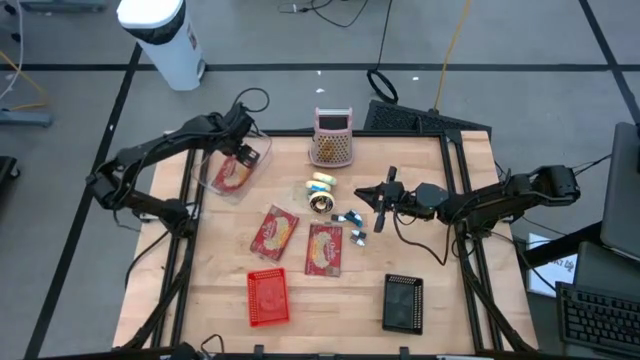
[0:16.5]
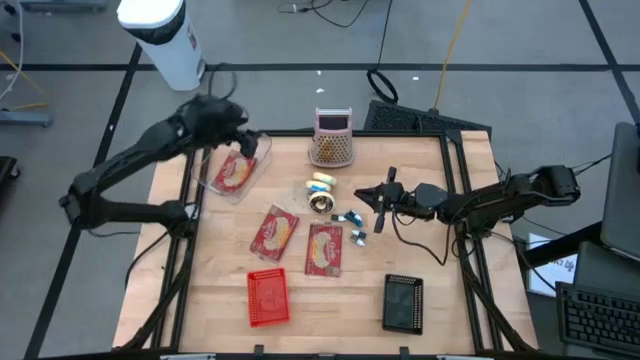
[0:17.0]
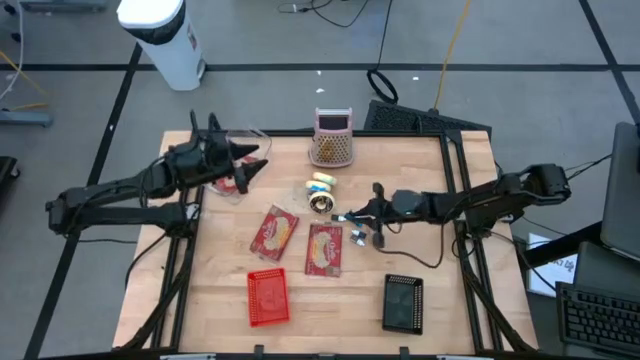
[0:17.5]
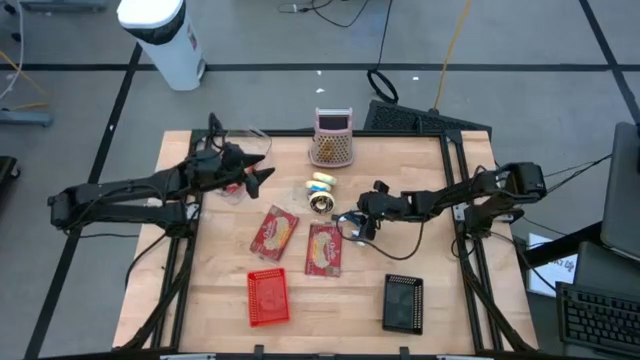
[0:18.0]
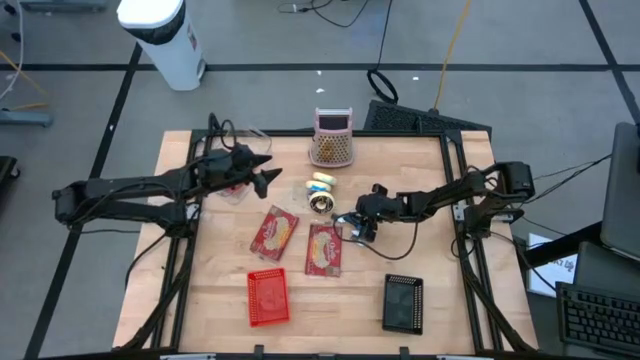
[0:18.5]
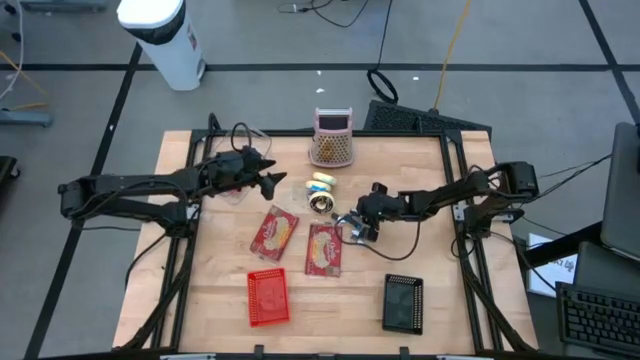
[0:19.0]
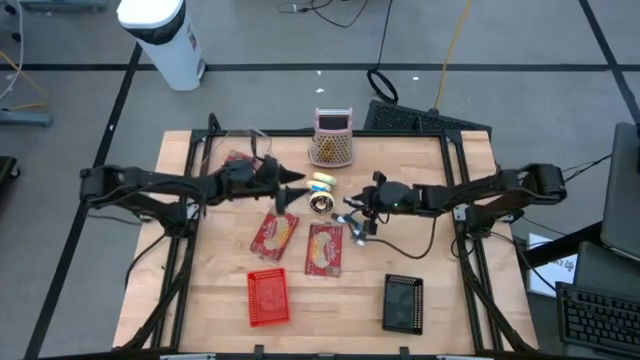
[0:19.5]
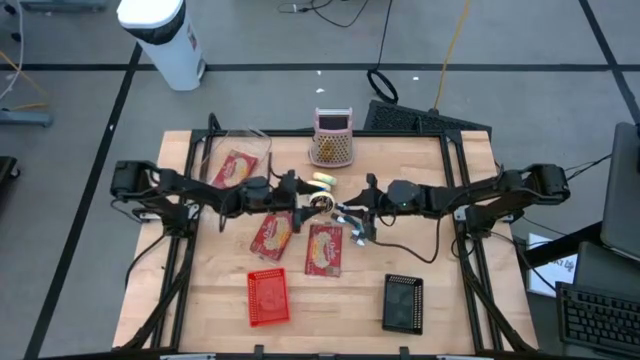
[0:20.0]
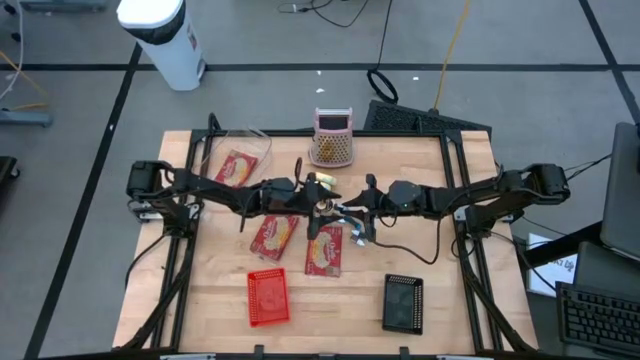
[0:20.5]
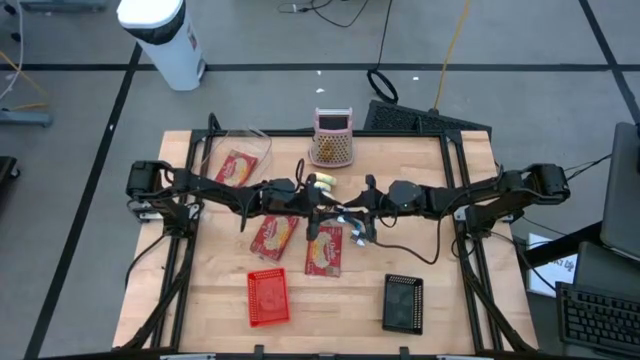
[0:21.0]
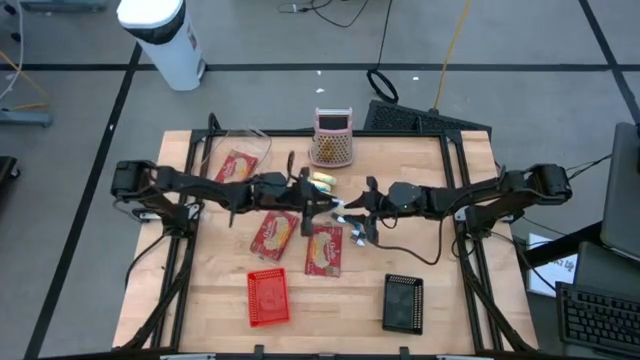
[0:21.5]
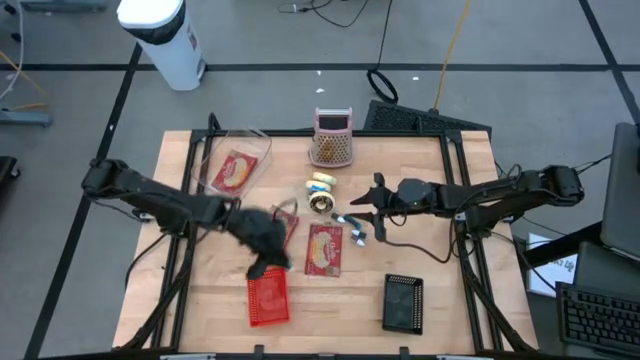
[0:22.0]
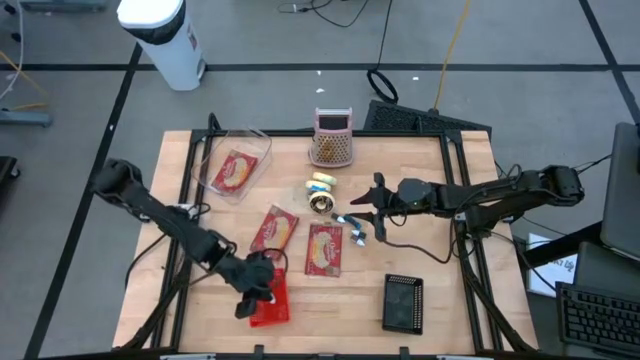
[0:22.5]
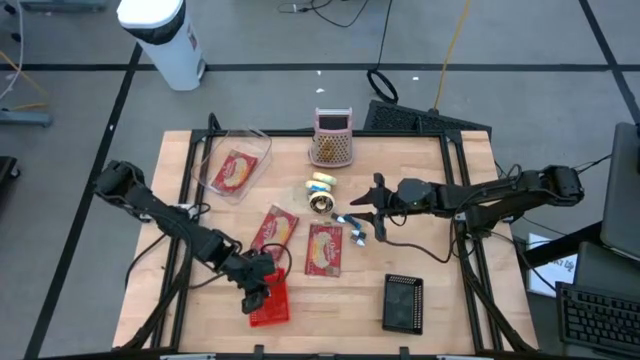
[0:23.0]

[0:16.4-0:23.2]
Put the violet food coloring bottle into the red bin

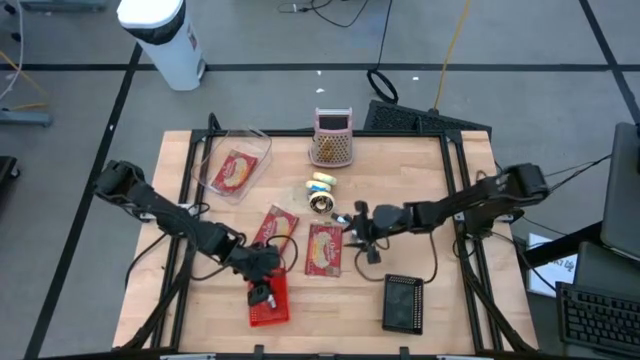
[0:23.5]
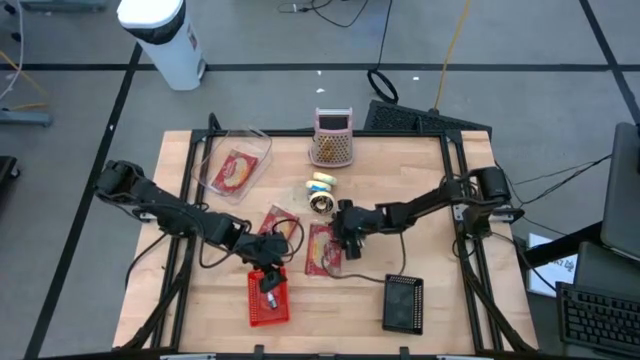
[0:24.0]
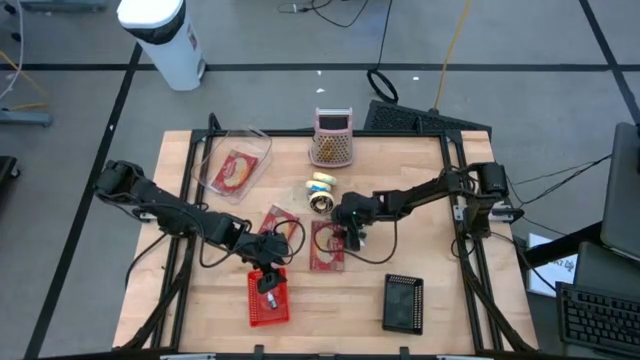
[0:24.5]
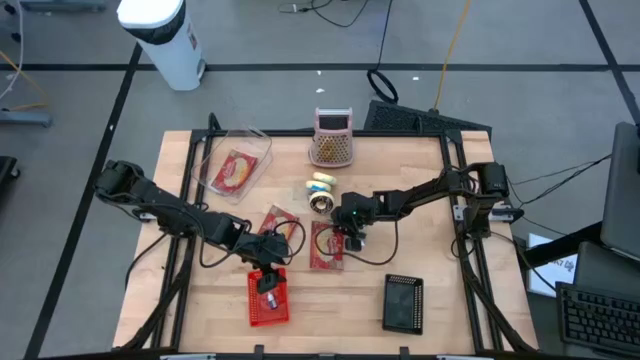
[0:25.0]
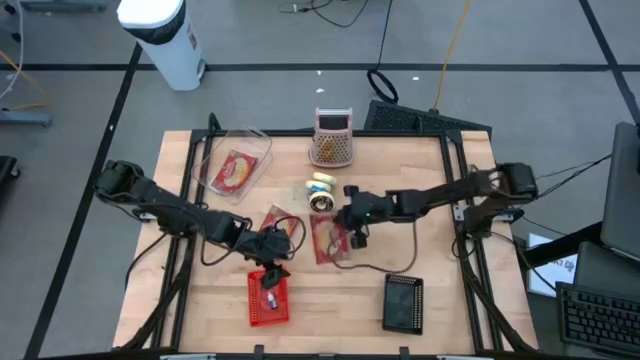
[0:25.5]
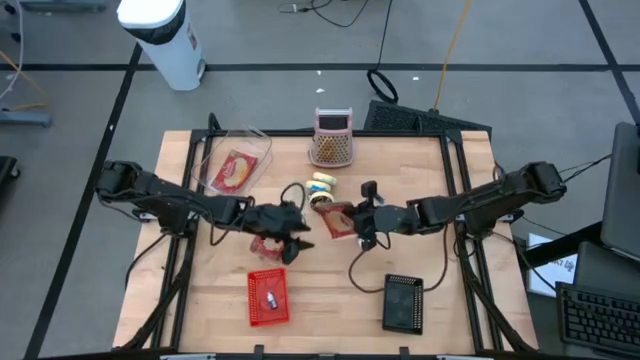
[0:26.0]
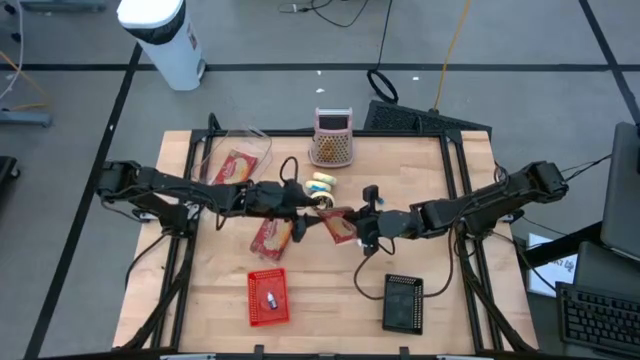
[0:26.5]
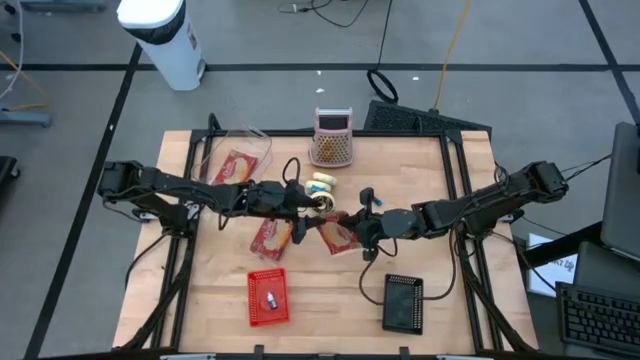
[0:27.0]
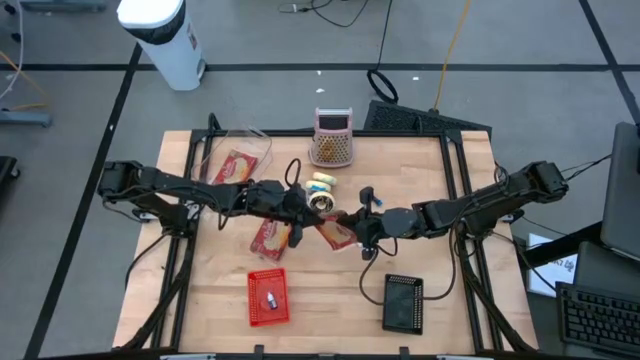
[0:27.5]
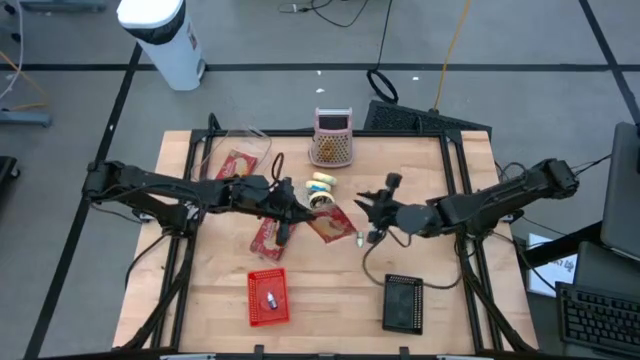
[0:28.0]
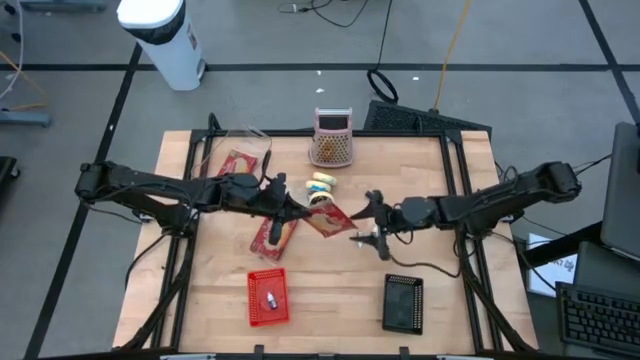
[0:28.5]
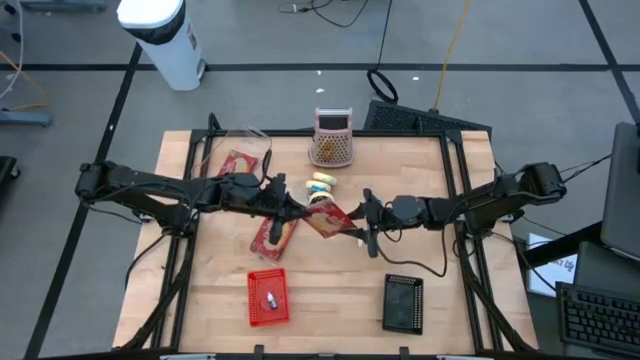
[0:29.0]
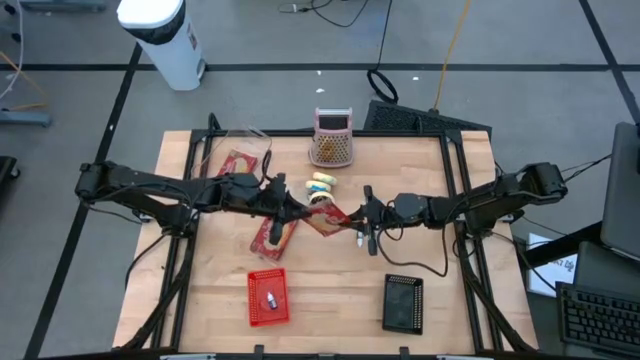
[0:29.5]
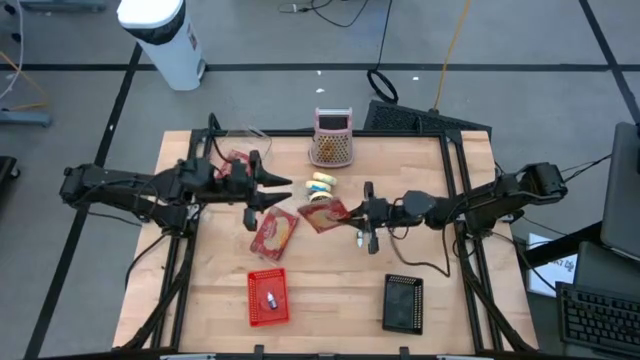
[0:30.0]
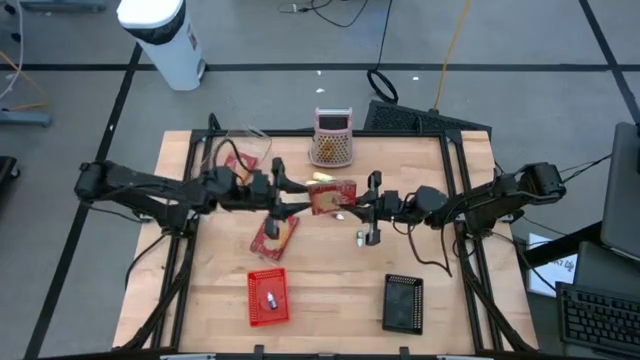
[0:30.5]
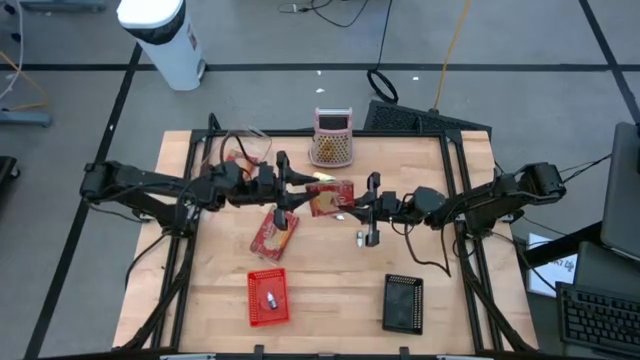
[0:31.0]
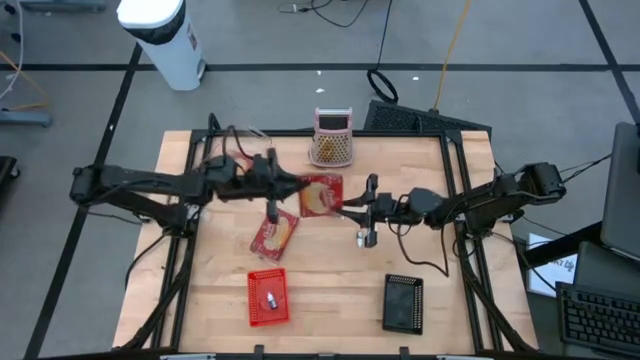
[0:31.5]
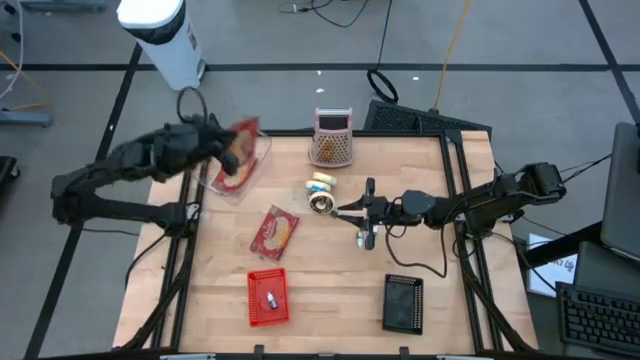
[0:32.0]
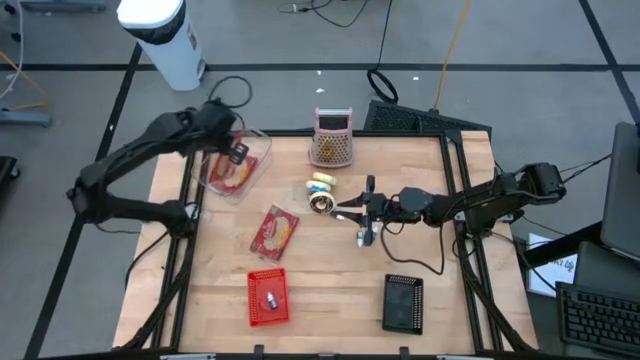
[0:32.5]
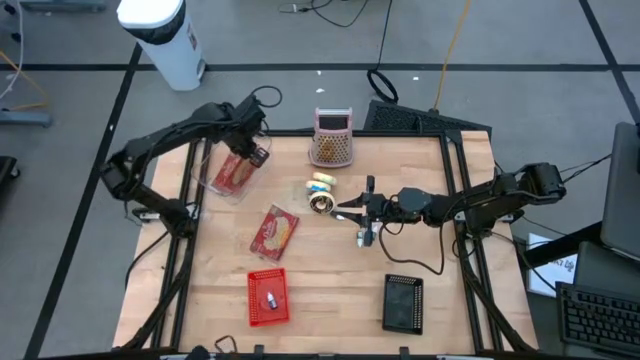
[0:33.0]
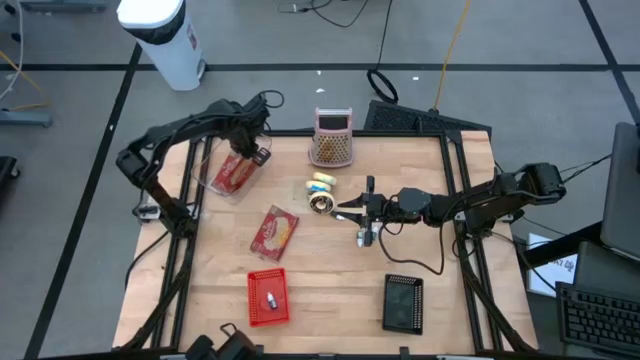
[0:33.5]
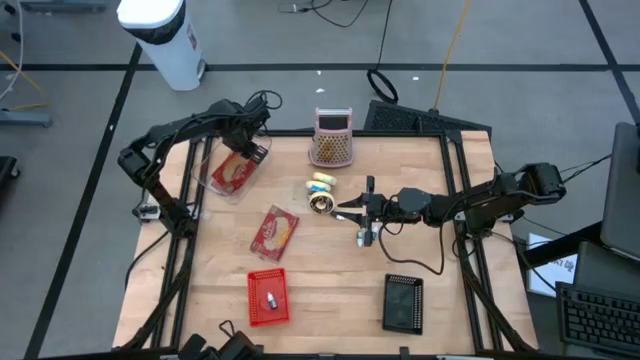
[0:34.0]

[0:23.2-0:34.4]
Put the right red popcorn bag into the transparent bin
